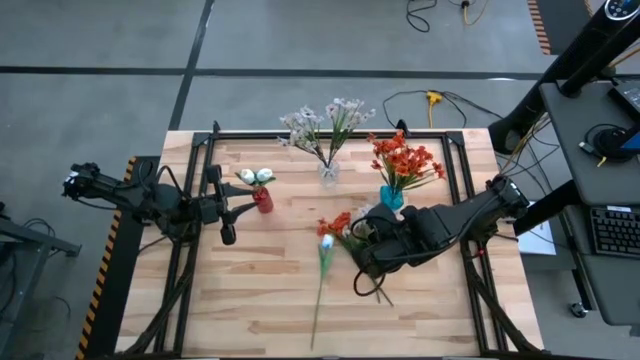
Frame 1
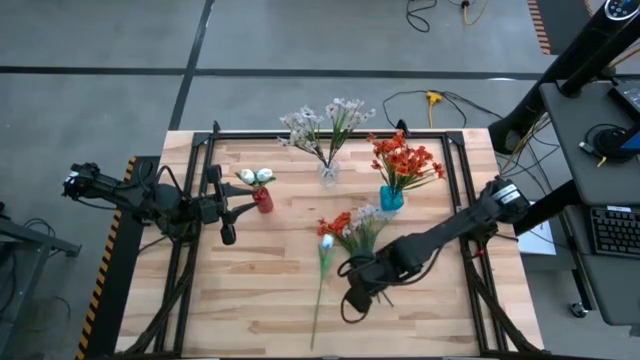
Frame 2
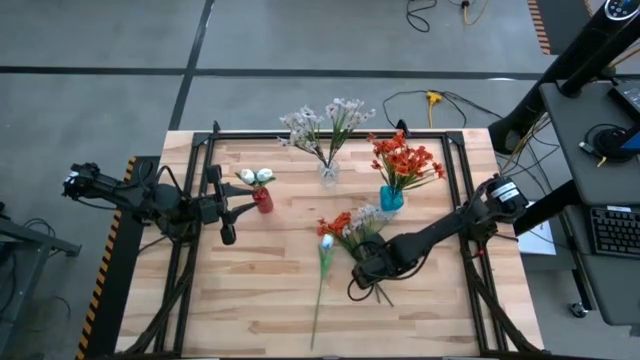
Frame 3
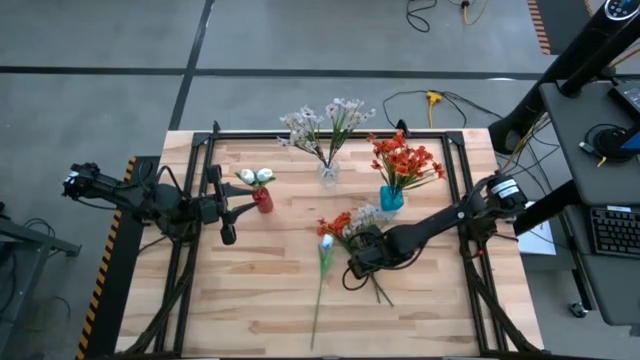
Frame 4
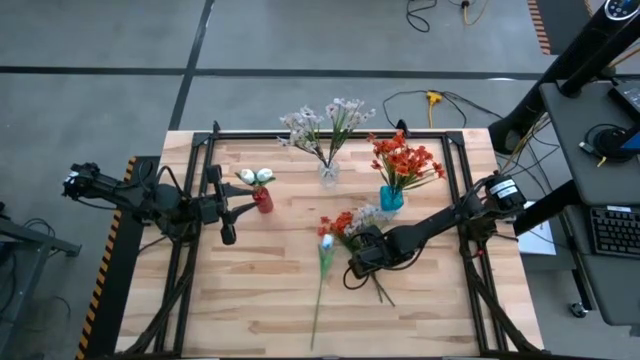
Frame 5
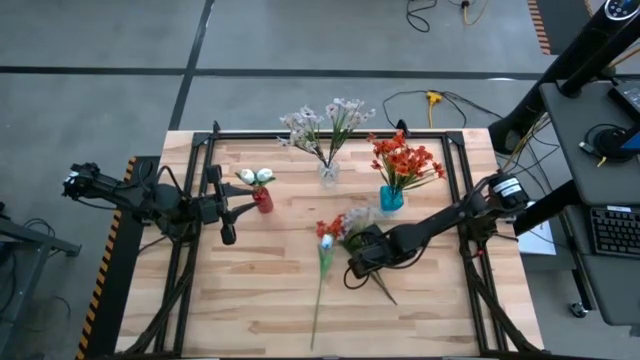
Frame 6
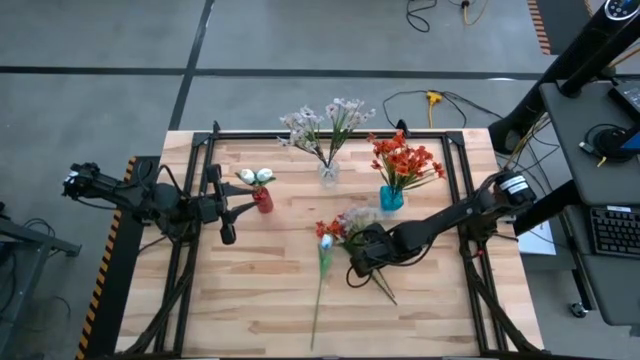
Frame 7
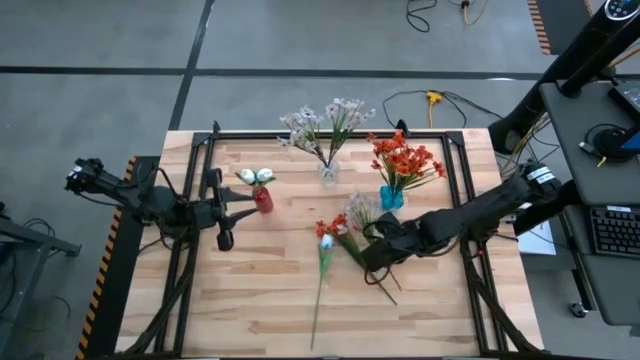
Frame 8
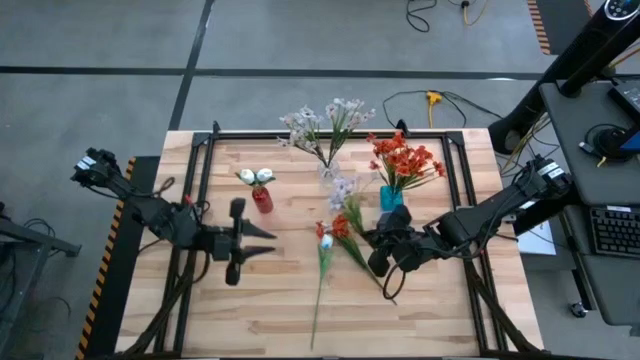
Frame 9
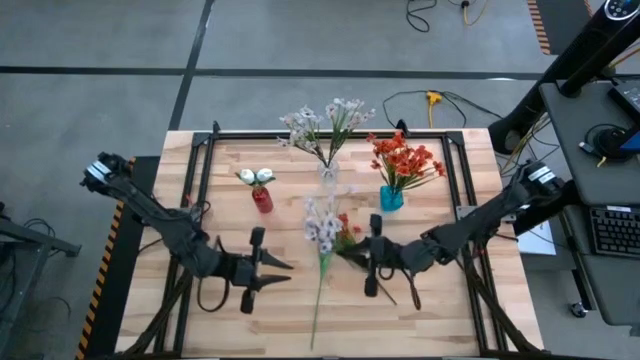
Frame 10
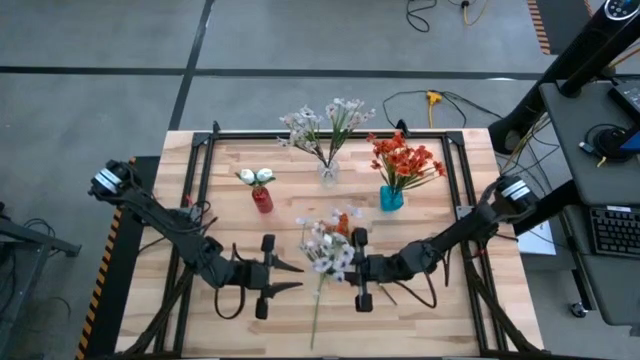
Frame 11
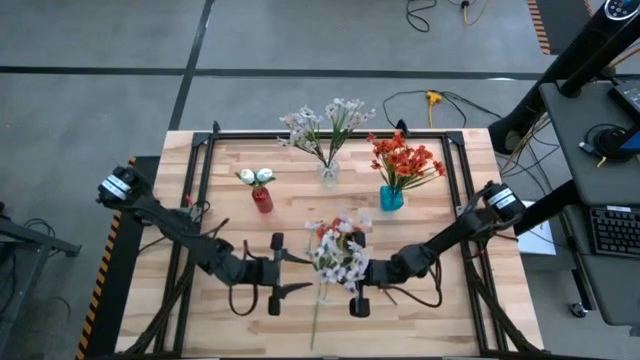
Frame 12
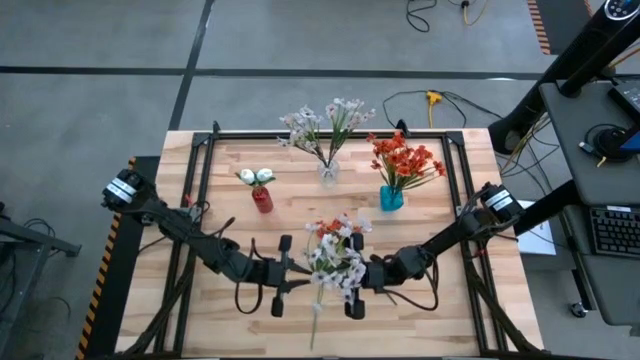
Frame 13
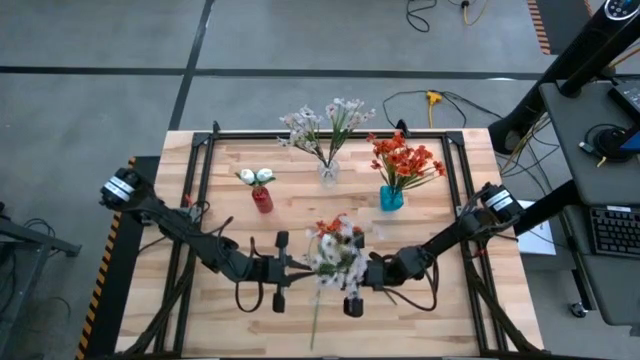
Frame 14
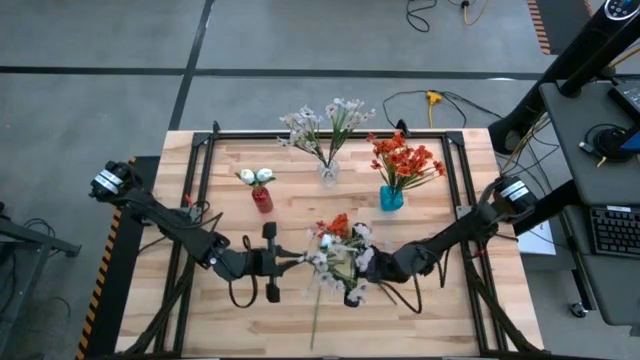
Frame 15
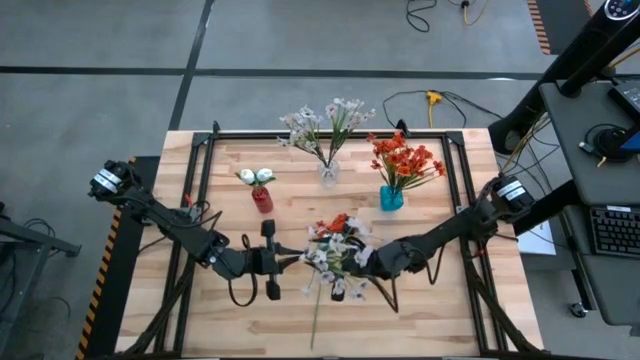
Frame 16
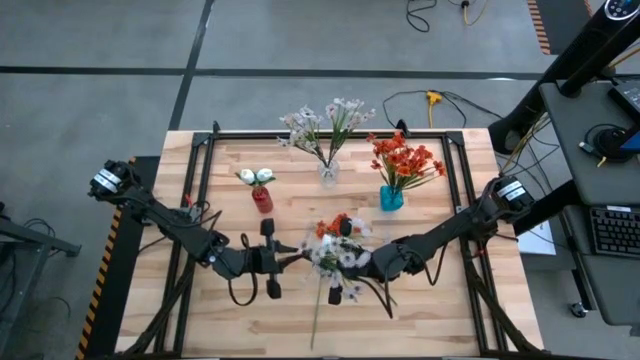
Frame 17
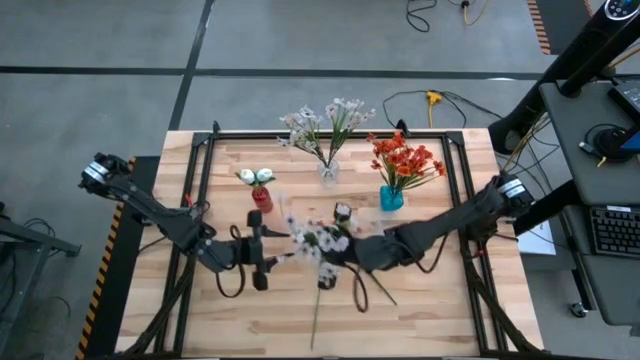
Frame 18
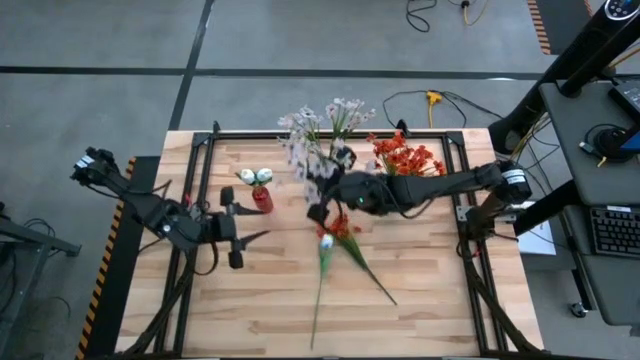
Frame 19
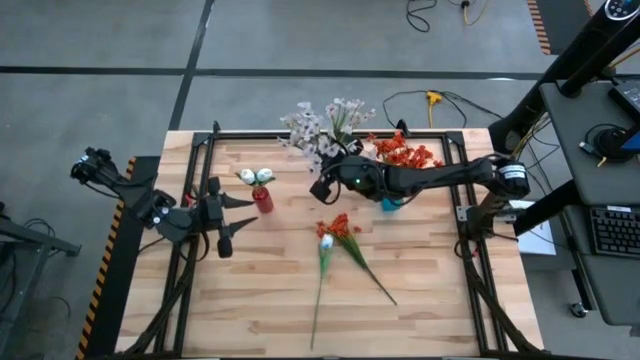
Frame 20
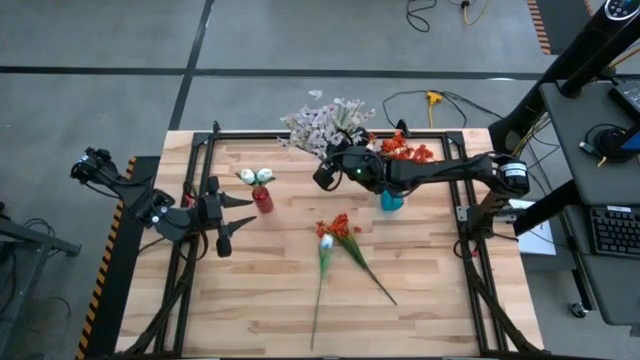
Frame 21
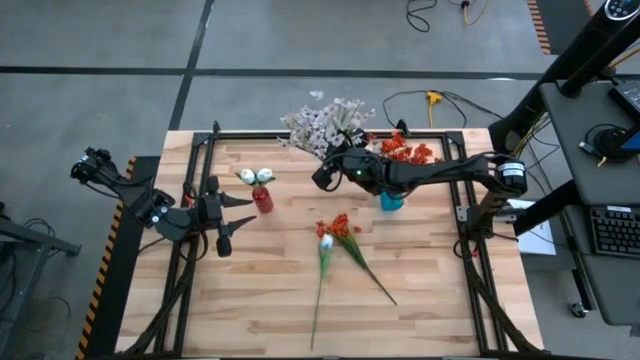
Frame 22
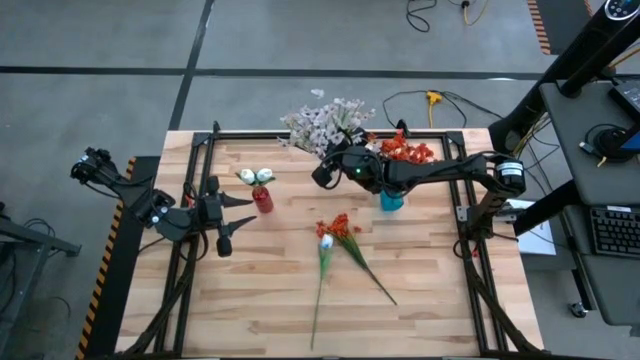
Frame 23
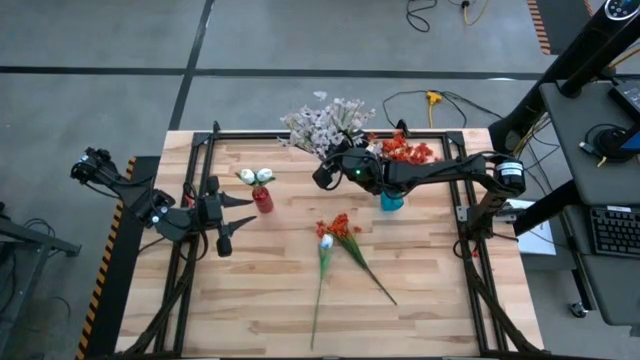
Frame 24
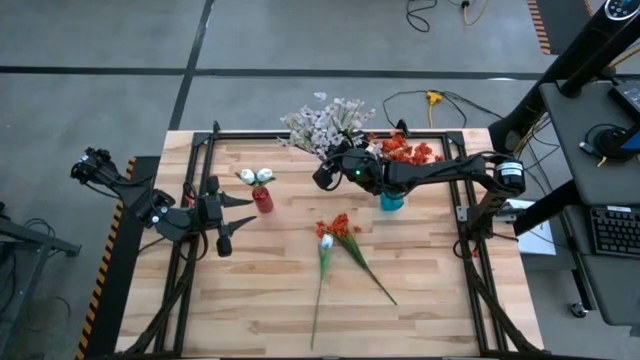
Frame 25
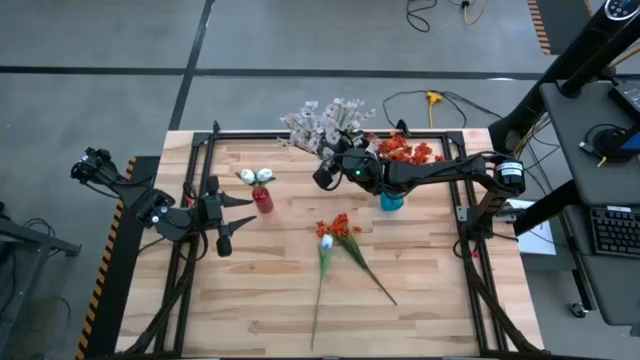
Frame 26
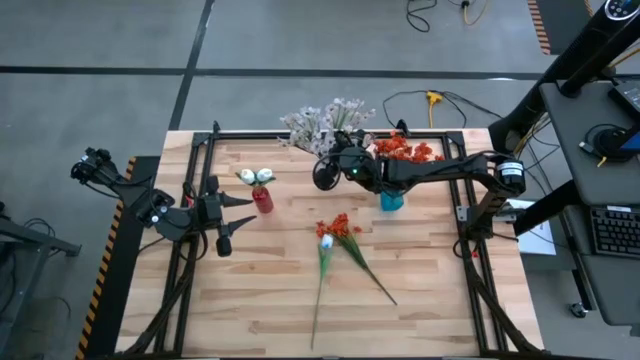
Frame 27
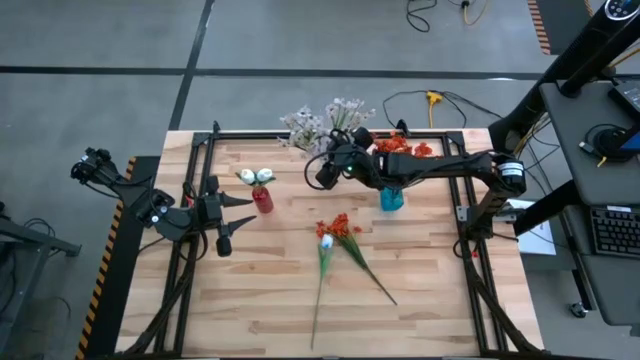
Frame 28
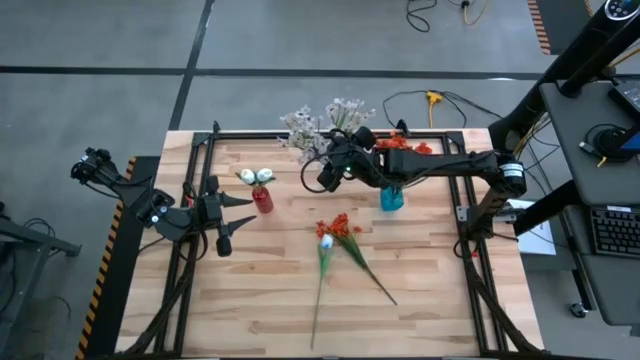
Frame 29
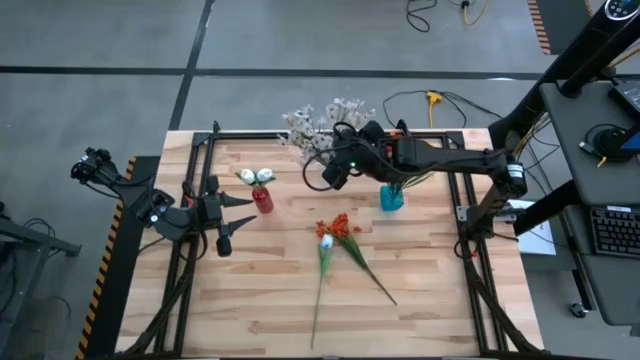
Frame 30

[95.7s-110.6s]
Task: Sort flowers into vase by color
Put the white flowers into the transparent vase

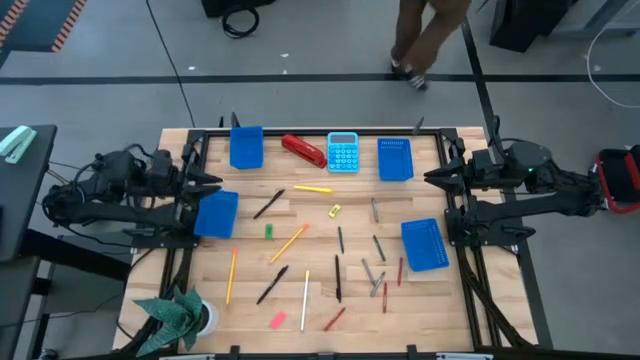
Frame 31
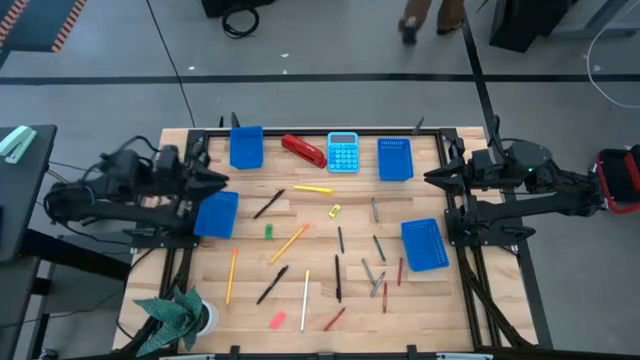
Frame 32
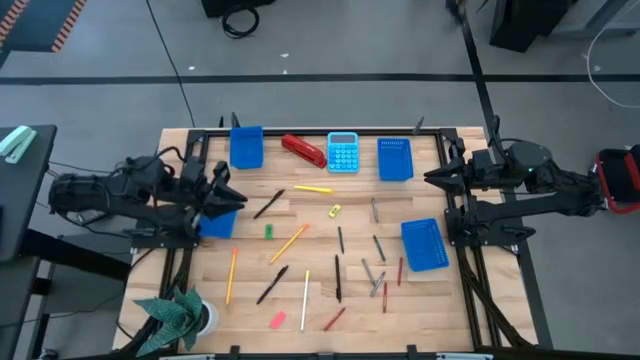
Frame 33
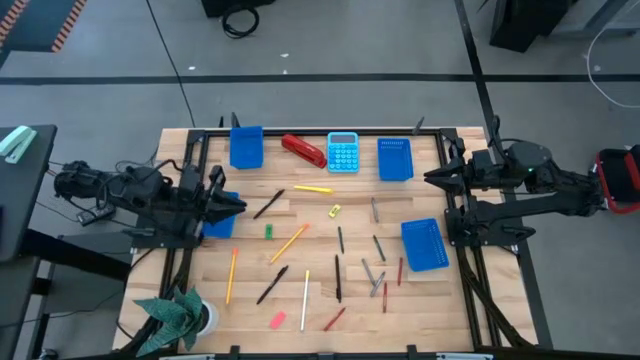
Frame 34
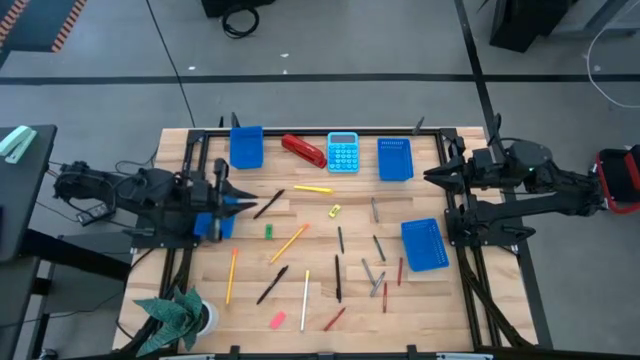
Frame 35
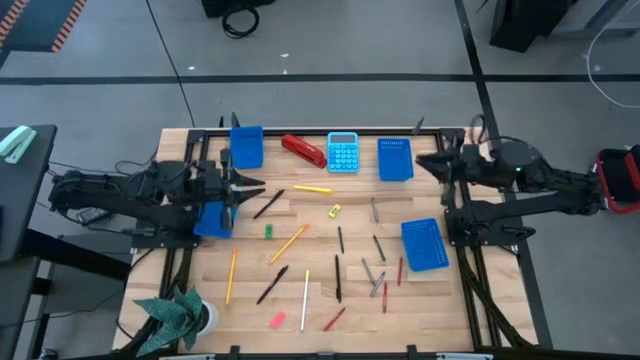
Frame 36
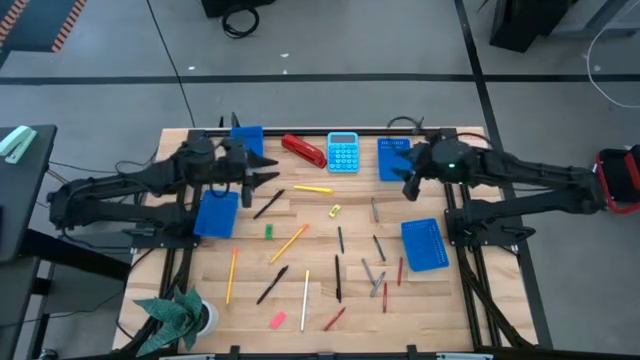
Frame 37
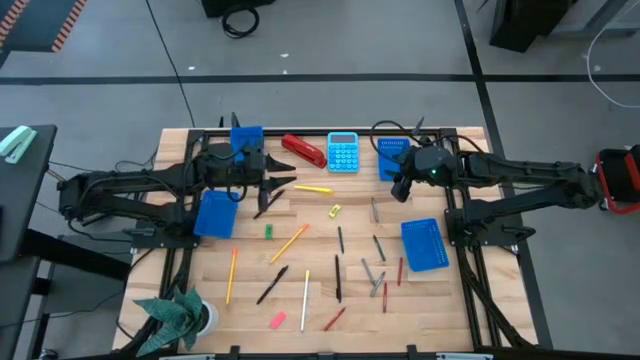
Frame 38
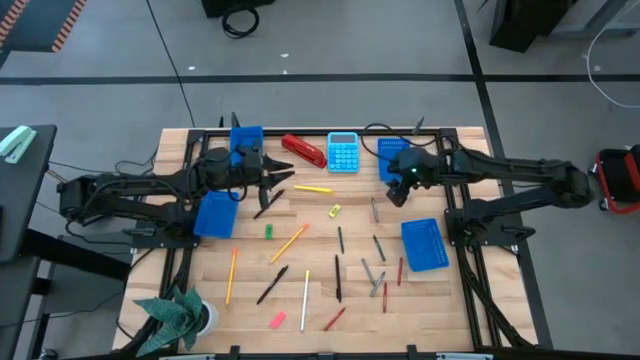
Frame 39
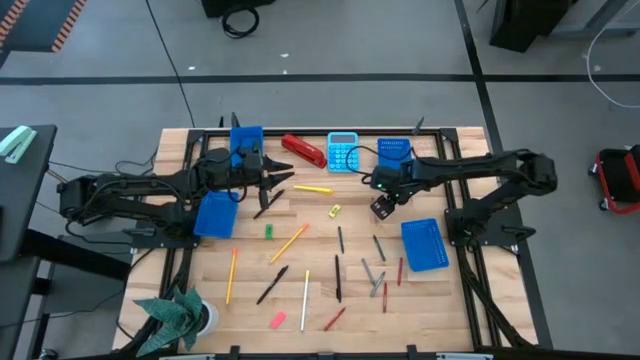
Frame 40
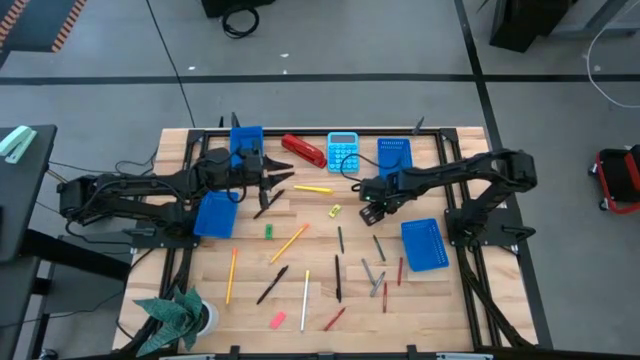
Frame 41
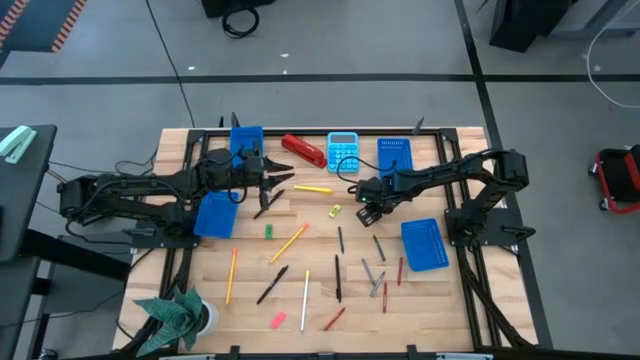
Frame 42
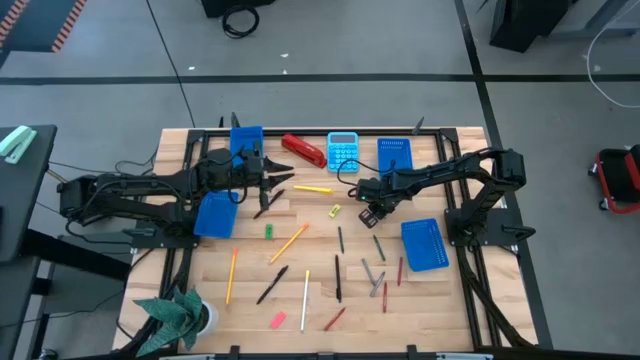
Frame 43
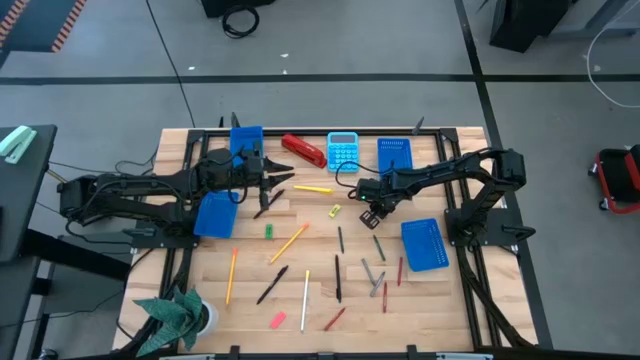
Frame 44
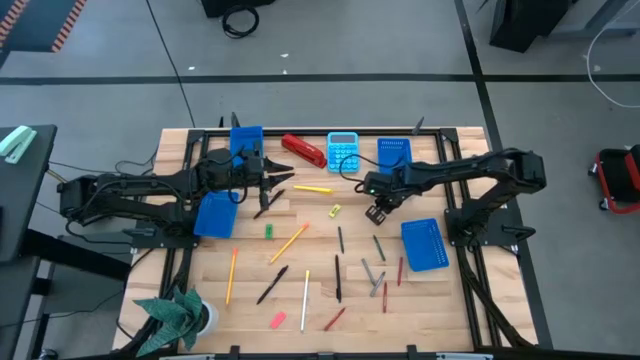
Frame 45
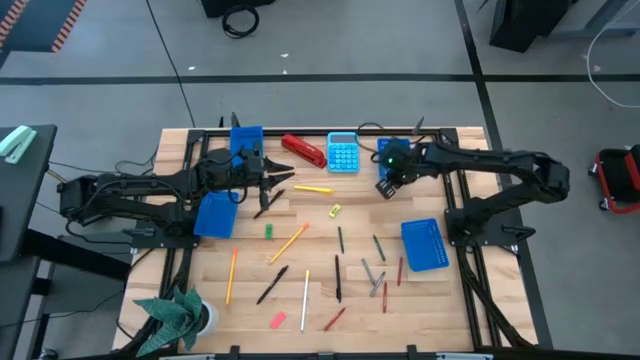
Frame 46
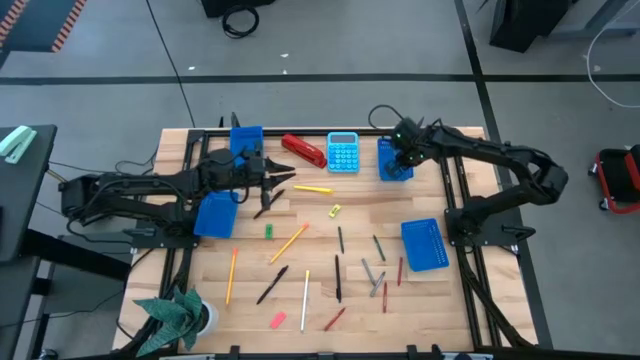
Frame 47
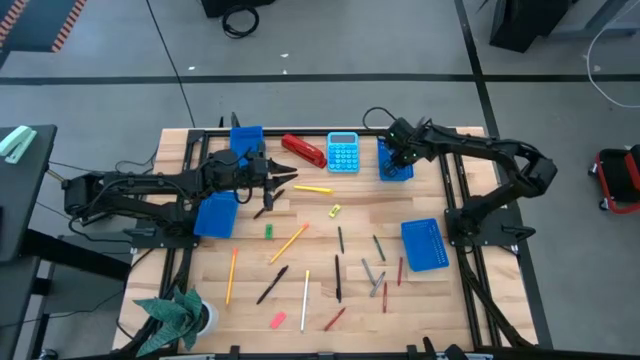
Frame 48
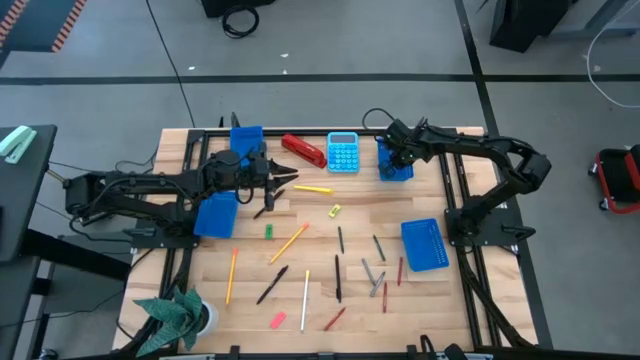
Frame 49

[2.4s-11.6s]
Task: Sort crayons/erasers/pens/pencils in bins
Put the top gray crayon into the top right bin
